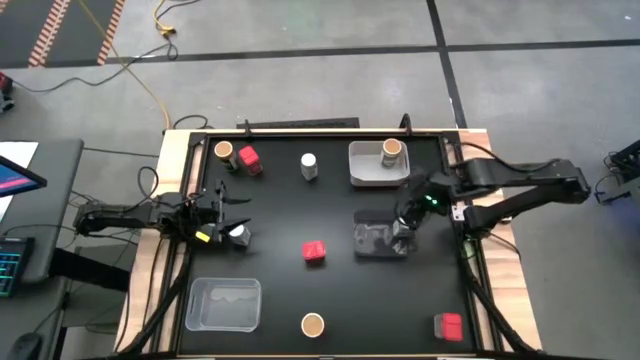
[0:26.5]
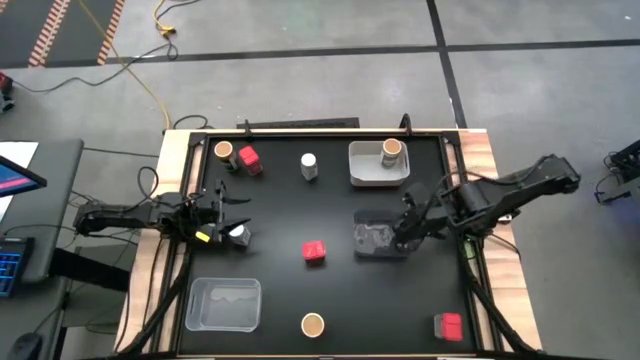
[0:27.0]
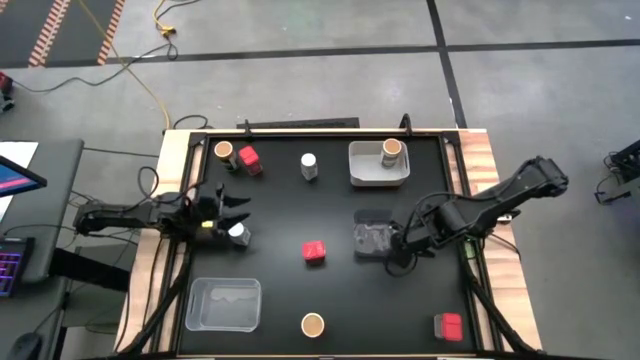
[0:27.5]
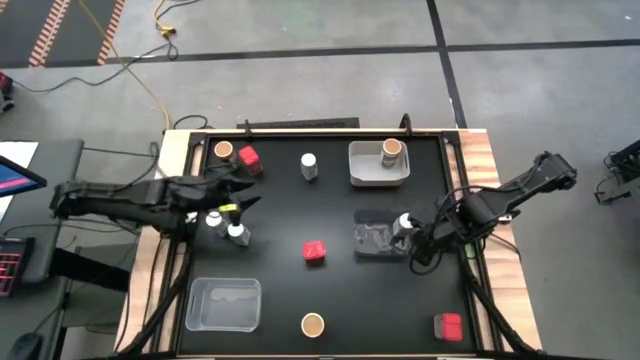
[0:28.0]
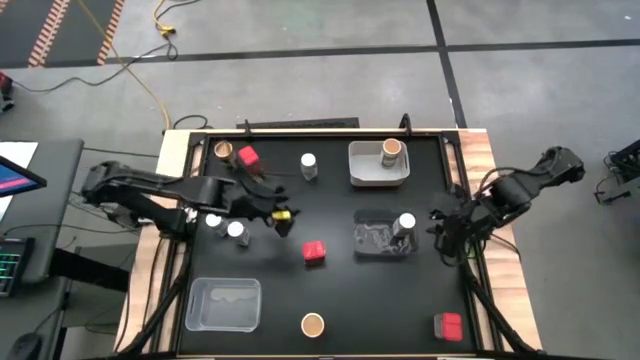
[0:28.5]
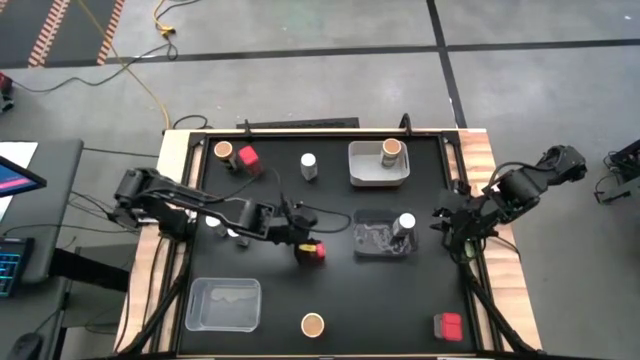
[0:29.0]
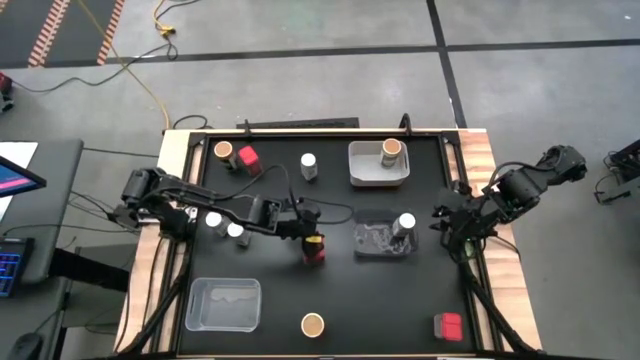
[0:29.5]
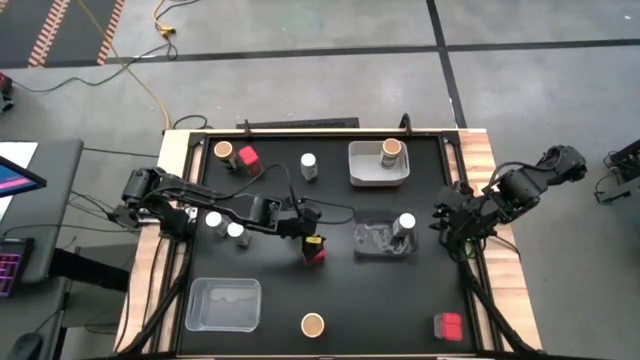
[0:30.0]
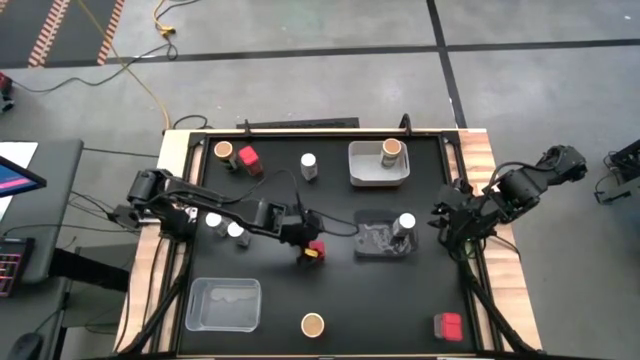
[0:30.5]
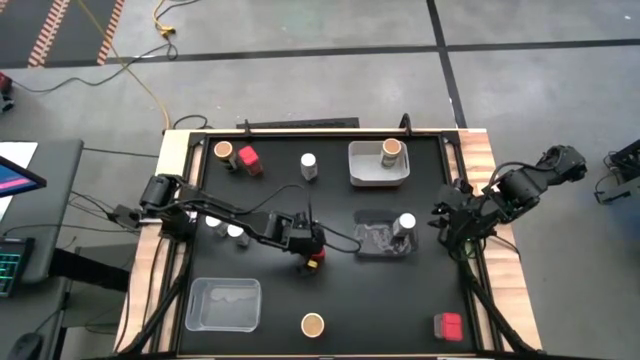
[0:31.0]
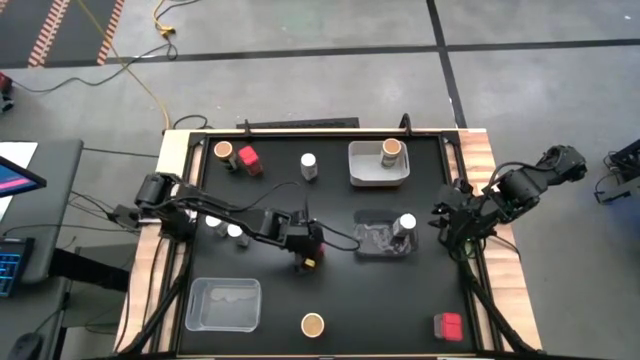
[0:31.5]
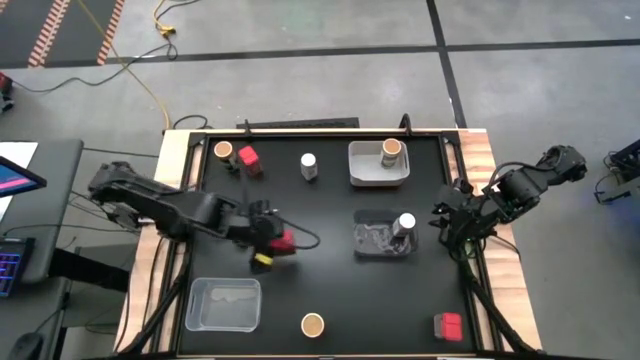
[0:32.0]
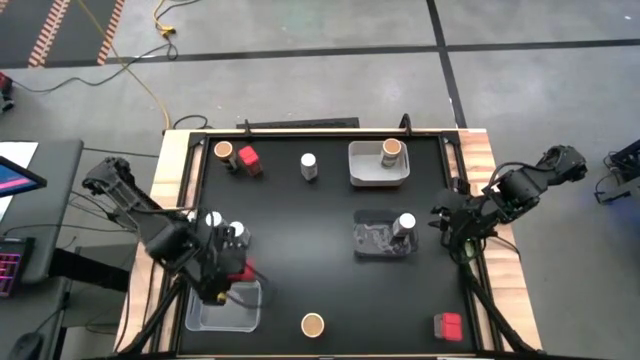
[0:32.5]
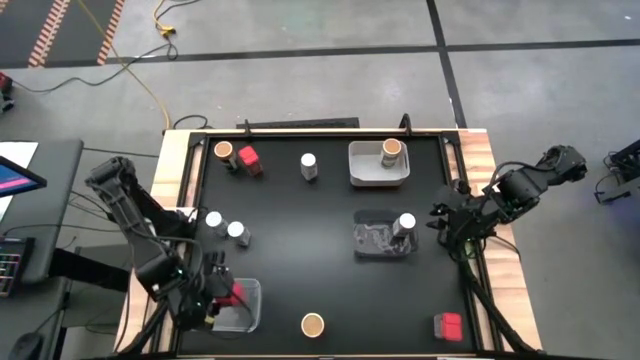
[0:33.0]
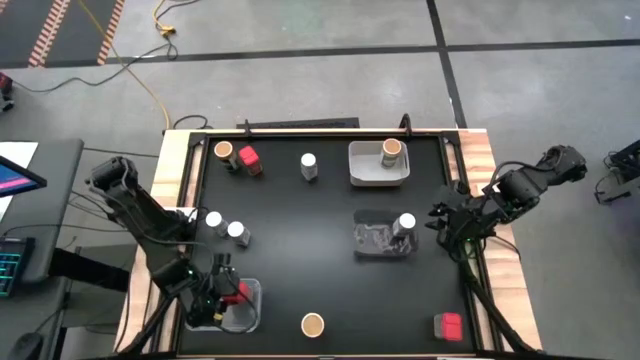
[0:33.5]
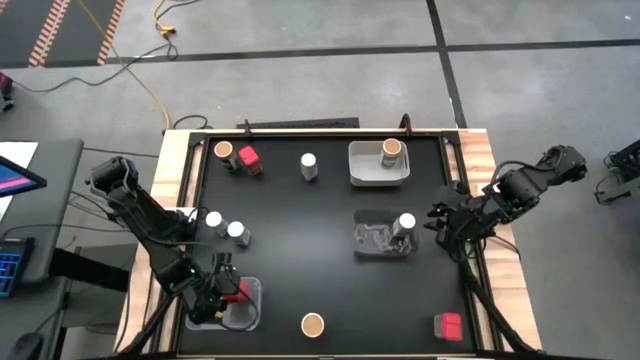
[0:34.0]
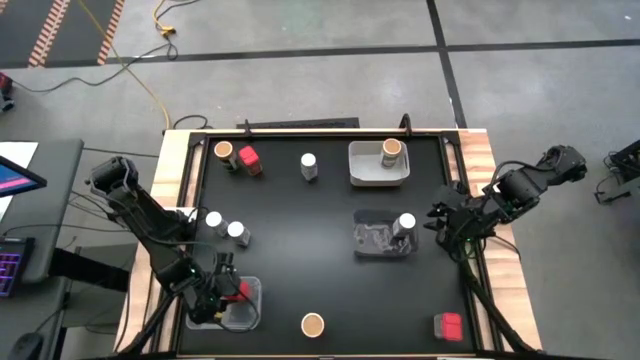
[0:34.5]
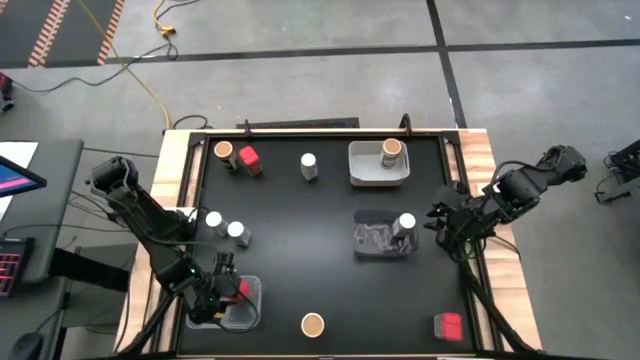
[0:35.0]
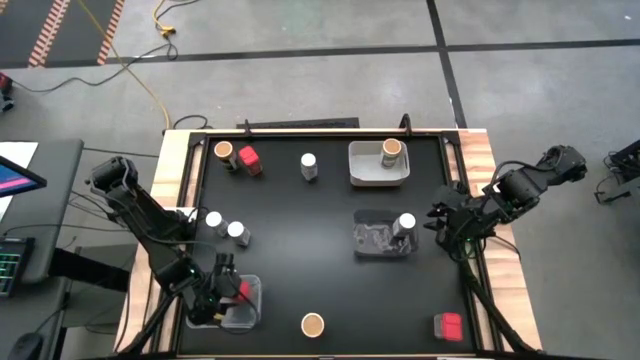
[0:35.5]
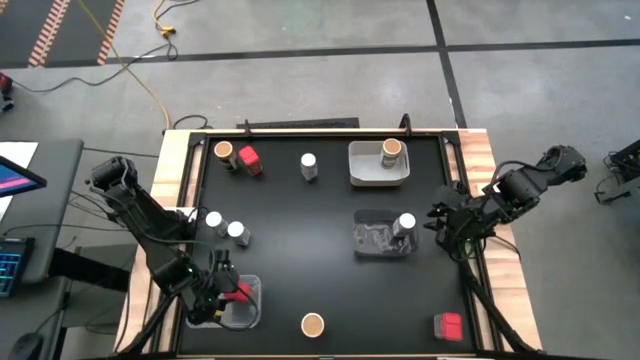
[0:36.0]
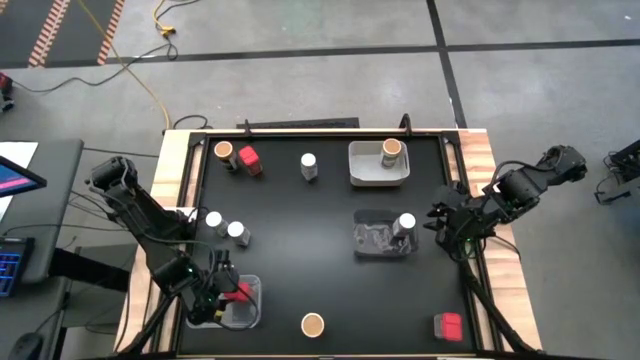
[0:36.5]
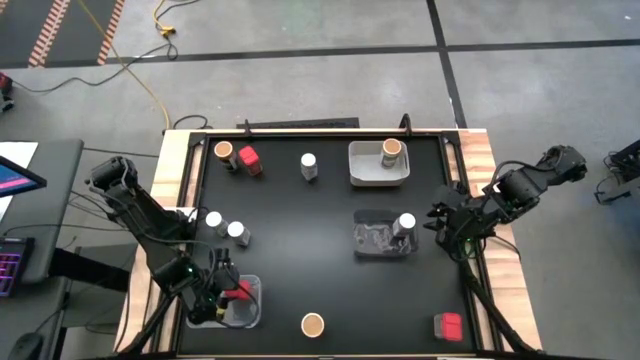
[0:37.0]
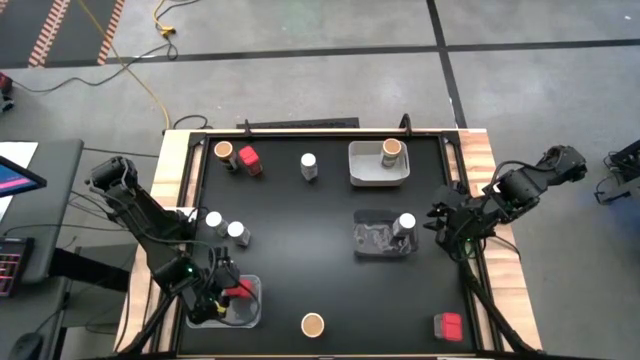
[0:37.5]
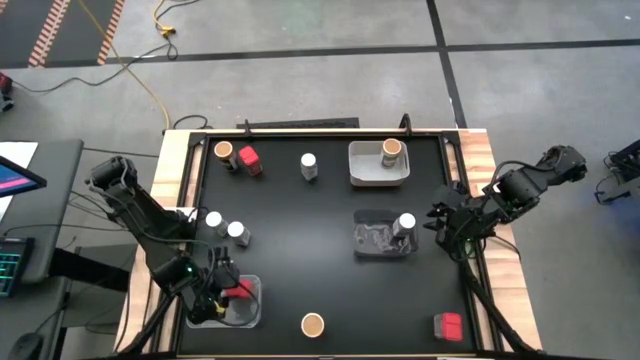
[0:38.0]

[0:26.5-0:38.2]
Task: Sort spices by type
Put the center red spice can in the transparent bin

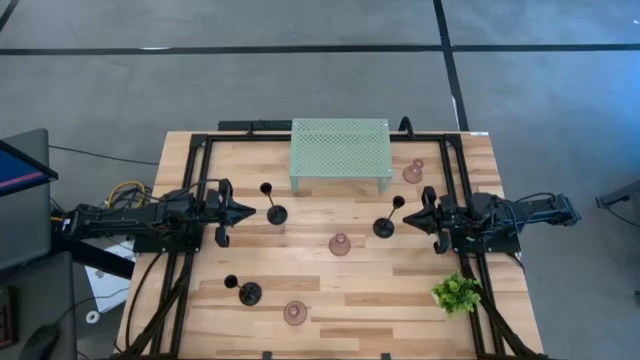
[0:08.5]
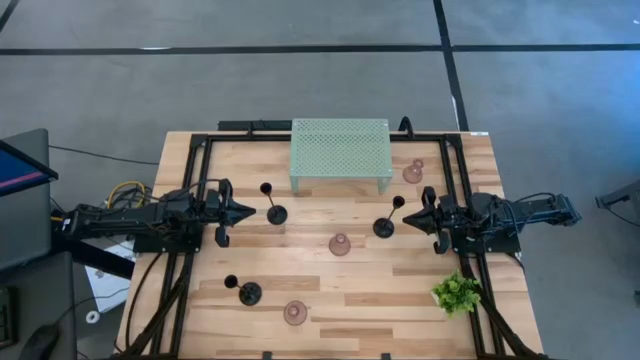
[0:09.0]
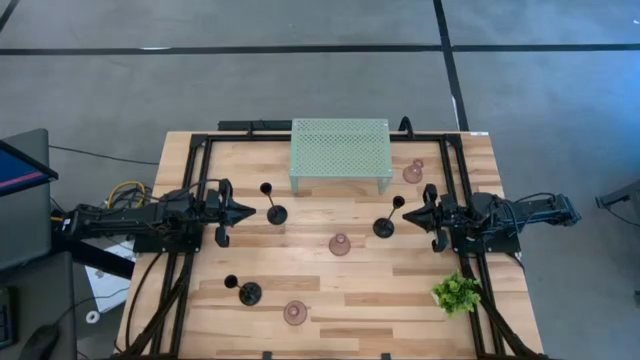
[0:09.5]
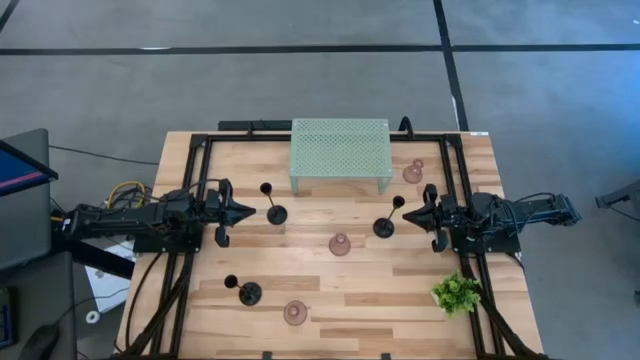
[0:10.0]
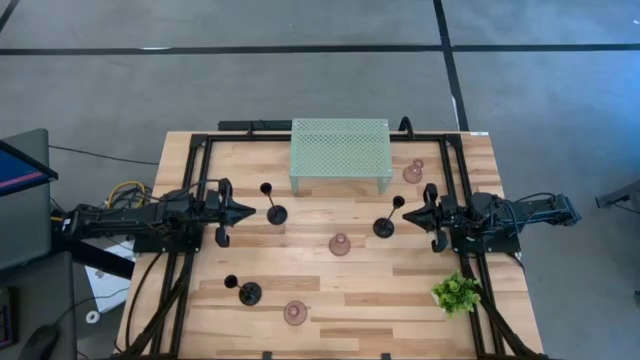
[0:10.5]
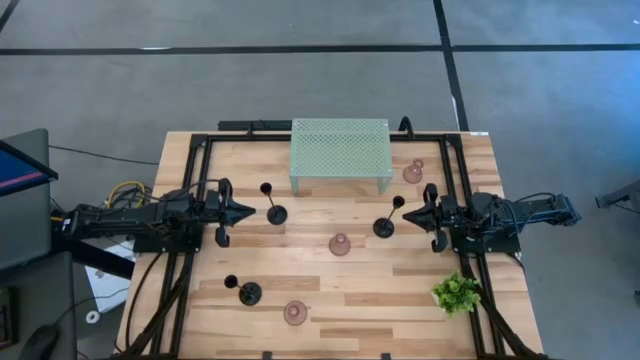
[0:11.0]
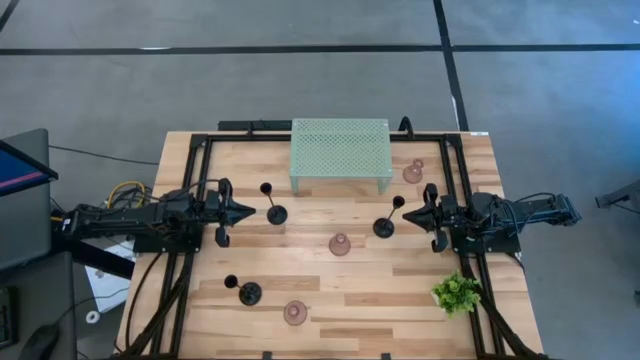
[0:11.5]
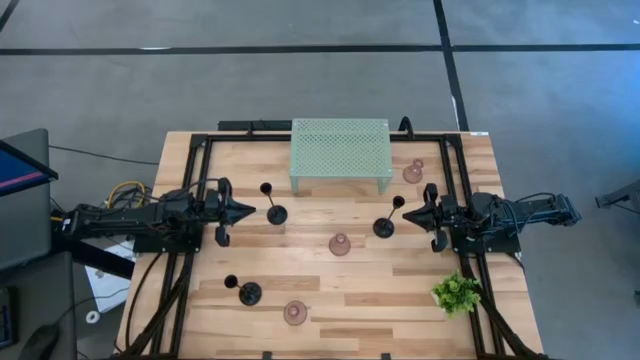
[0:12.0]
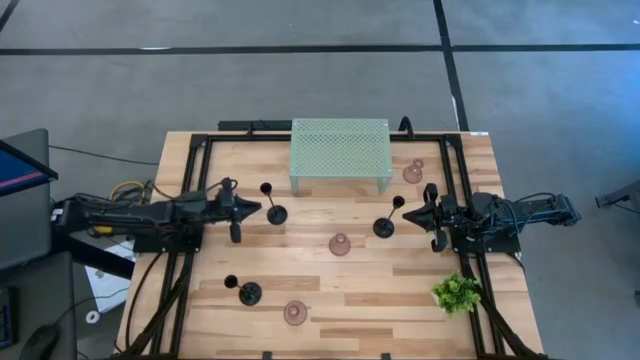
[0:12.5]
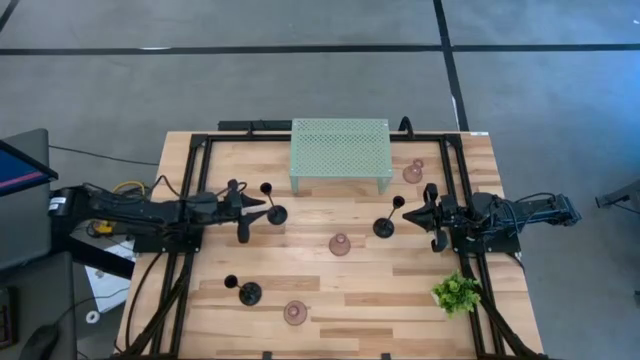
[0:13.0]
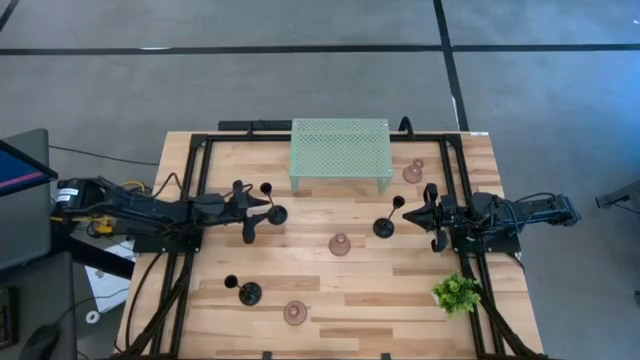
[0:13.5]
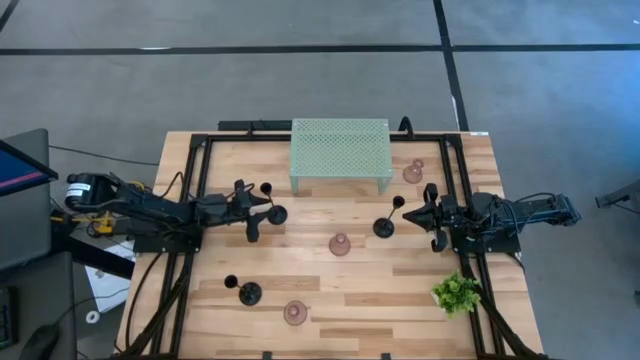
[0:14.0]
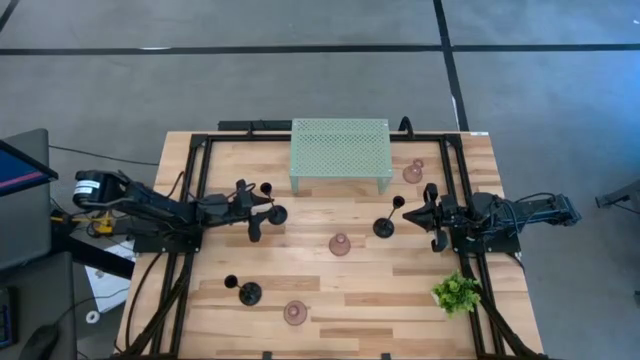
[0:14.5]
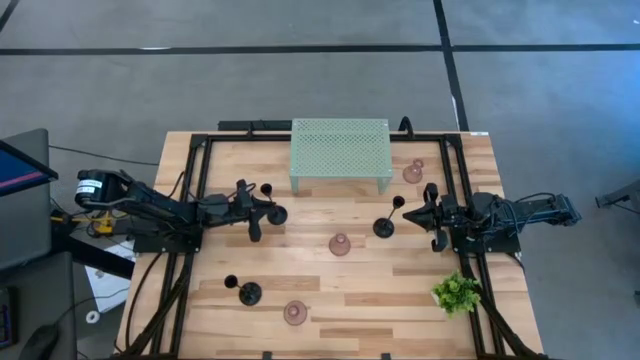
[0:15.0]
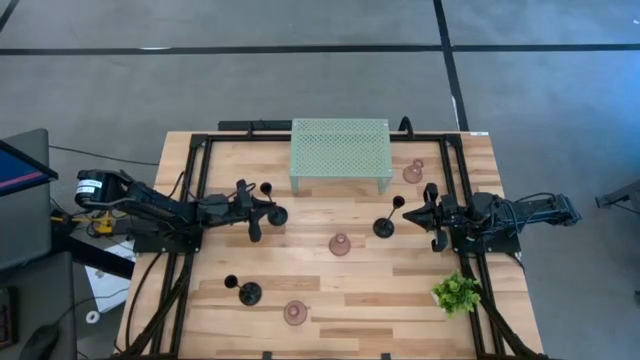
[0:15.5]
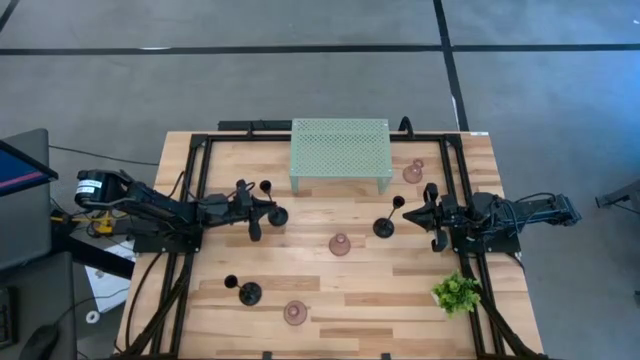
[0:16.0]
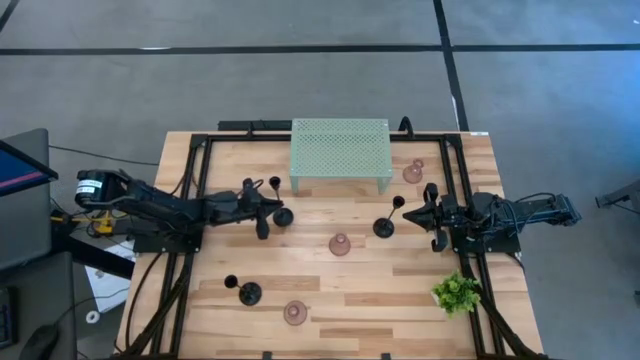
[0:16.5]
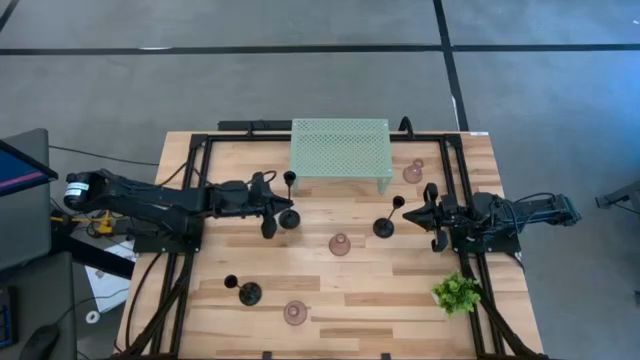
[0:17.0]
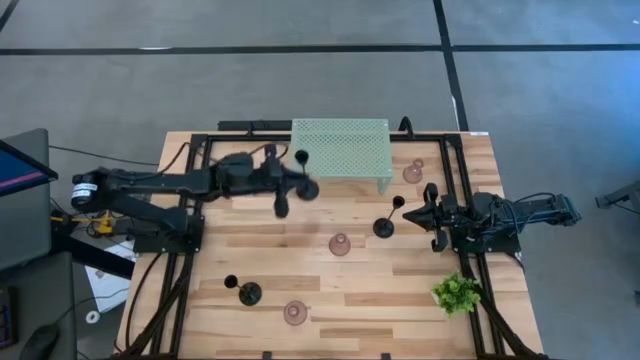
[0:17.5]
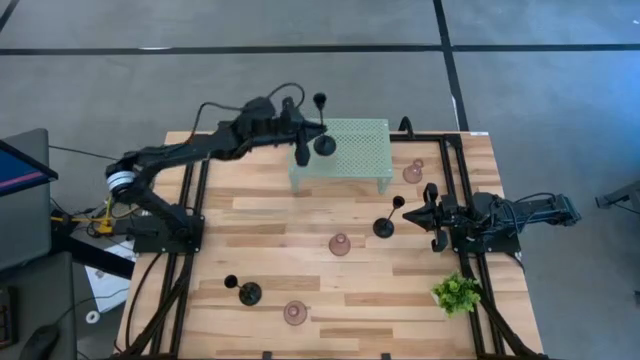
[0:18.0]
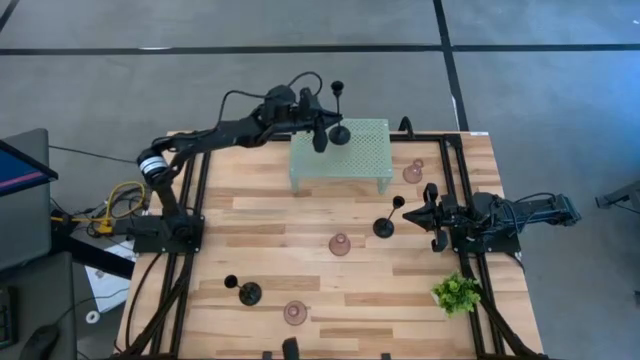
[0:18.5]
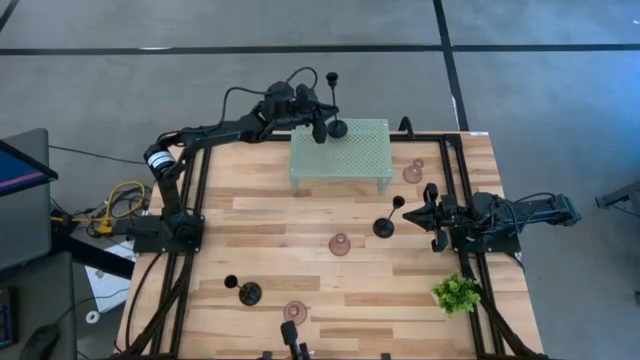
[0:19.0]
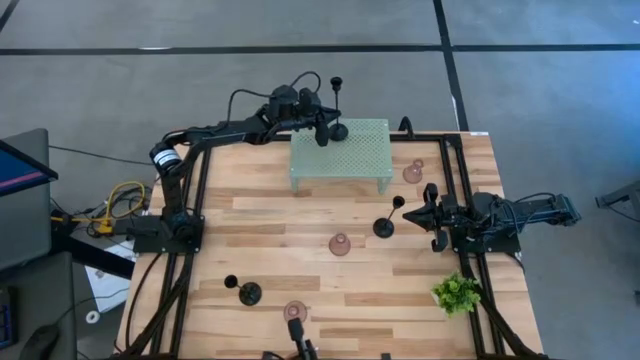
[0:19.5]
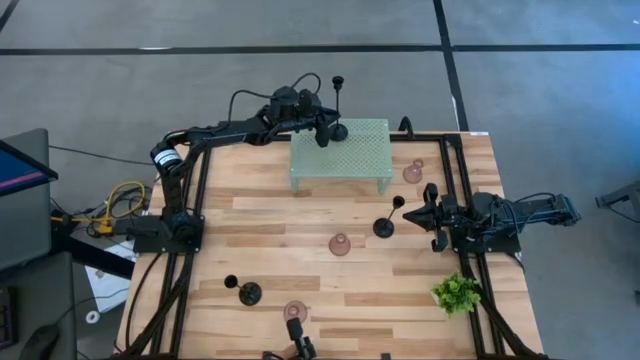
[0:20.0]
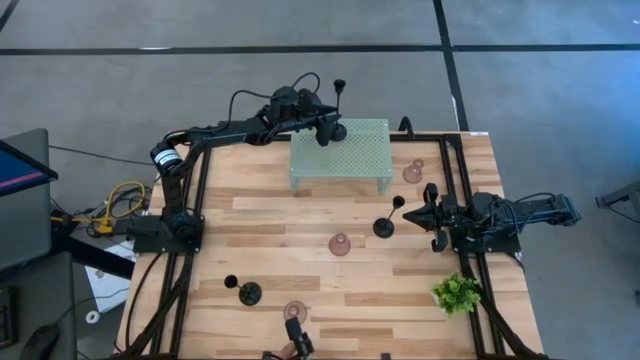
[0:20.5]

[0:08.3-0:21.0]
Task: Pick & Place candle stick holders
Put the top left black candle holder on the shelf
